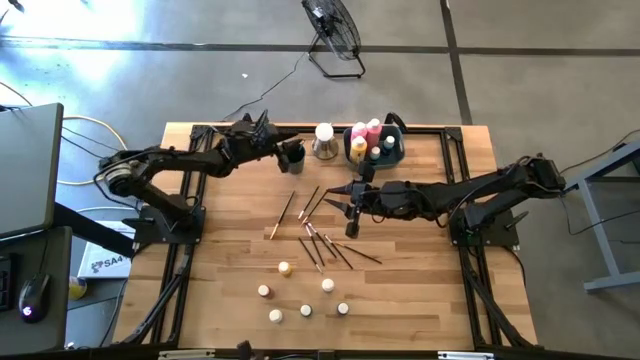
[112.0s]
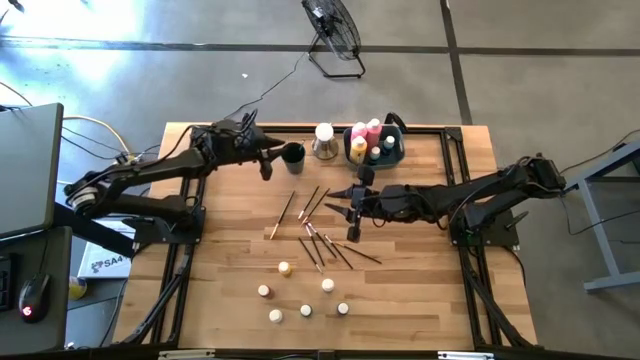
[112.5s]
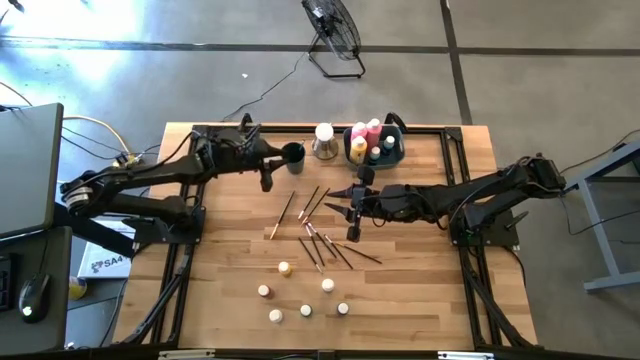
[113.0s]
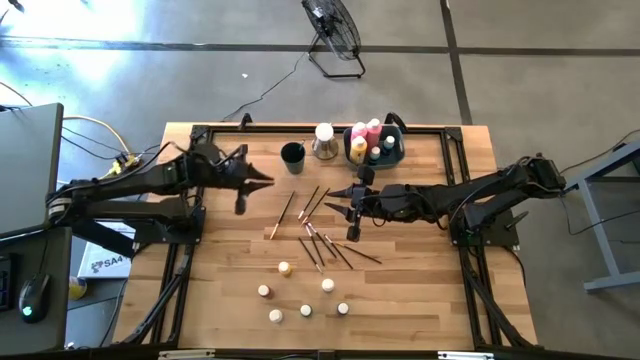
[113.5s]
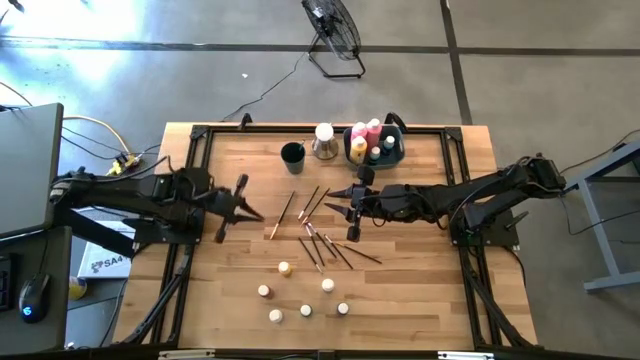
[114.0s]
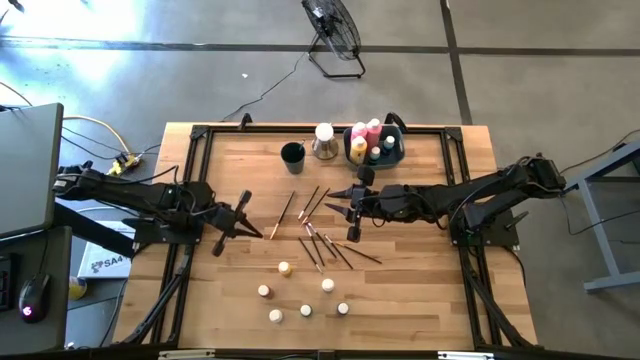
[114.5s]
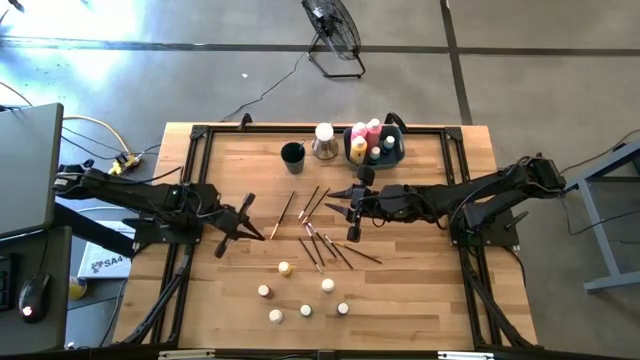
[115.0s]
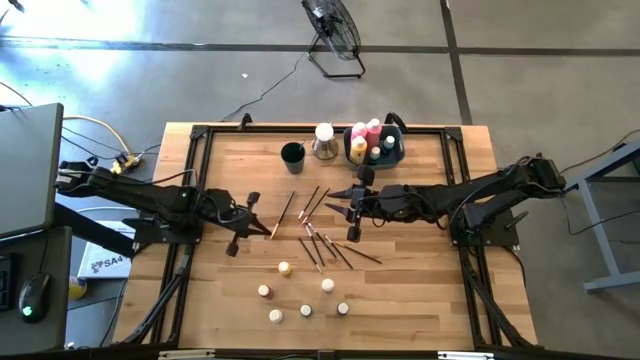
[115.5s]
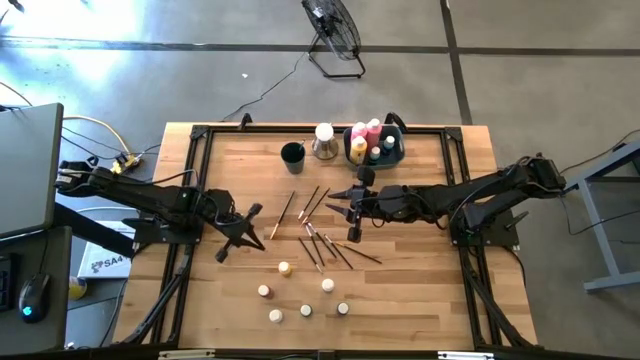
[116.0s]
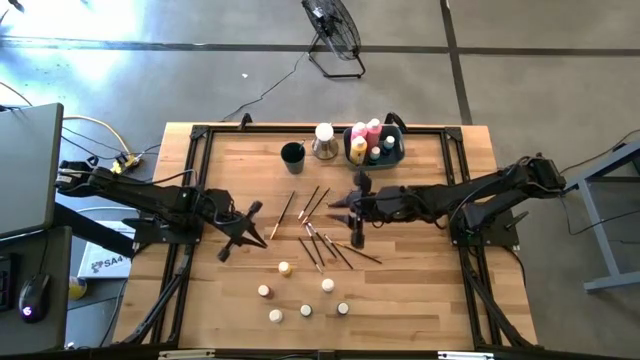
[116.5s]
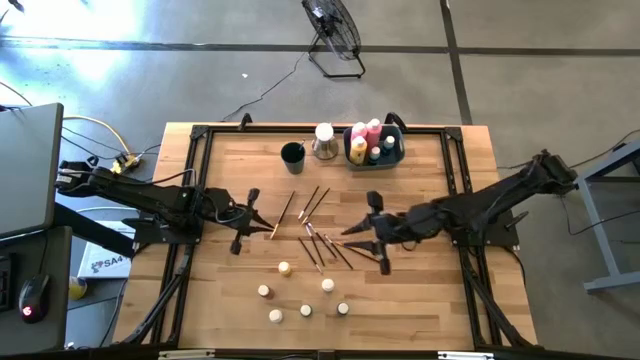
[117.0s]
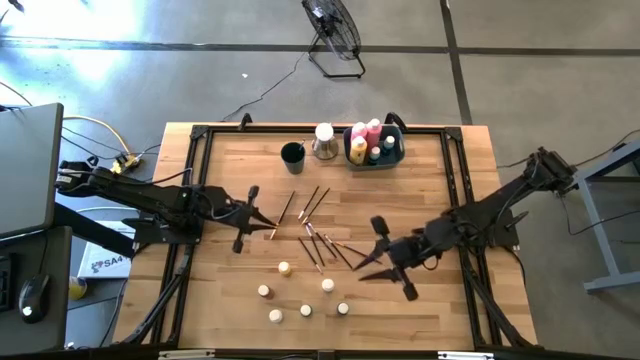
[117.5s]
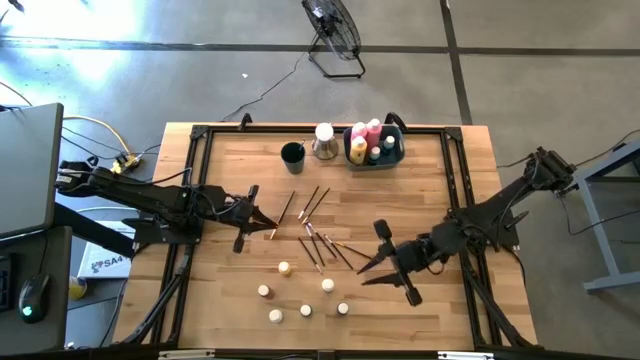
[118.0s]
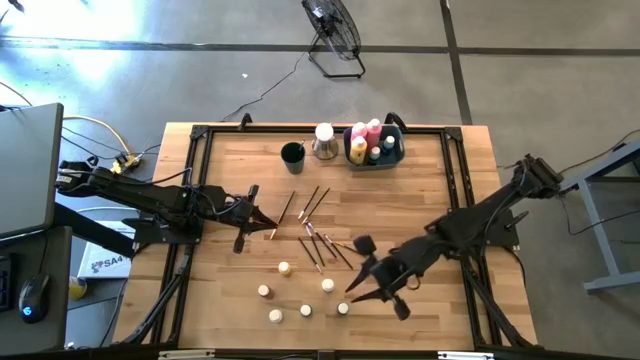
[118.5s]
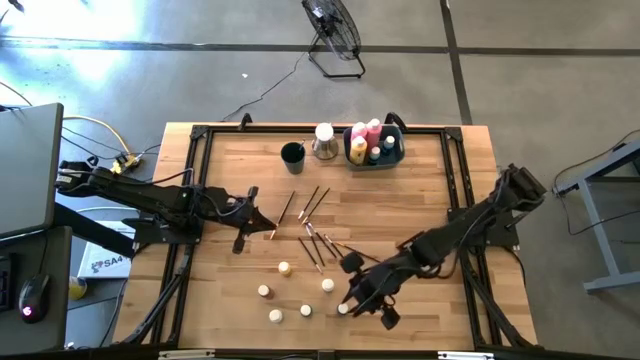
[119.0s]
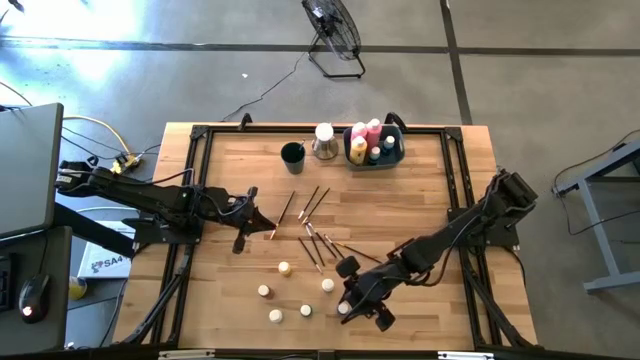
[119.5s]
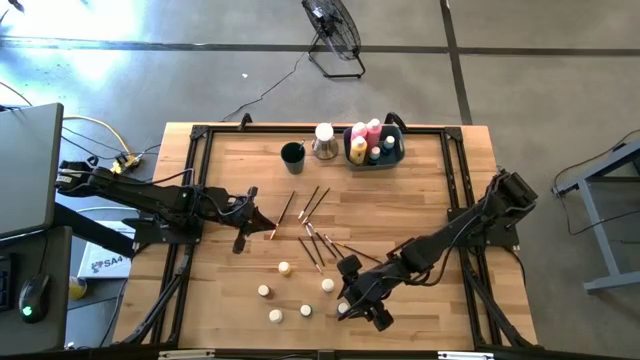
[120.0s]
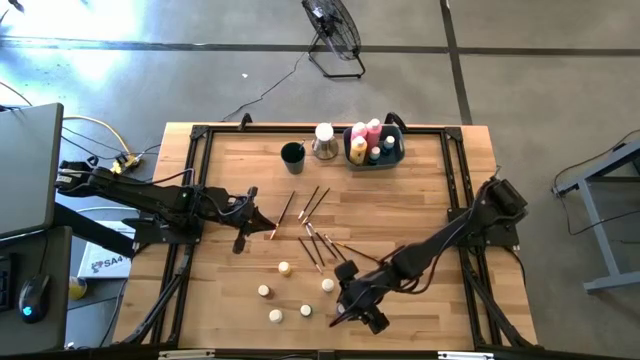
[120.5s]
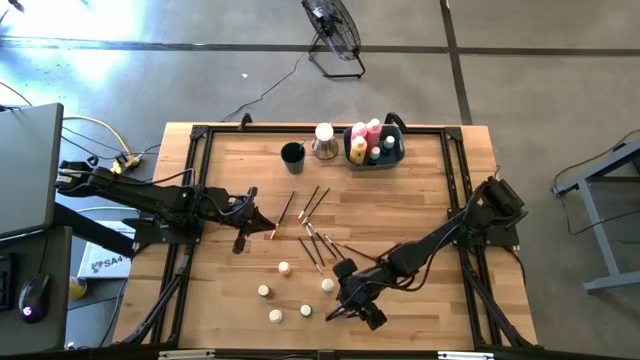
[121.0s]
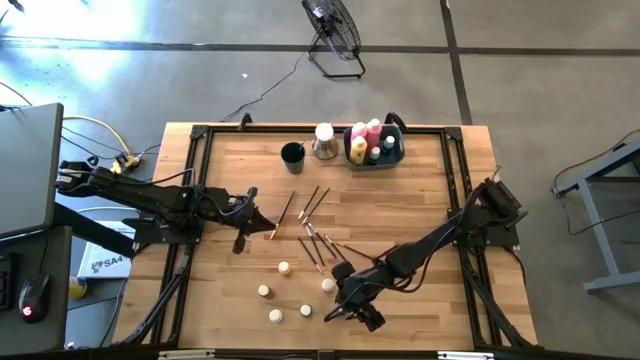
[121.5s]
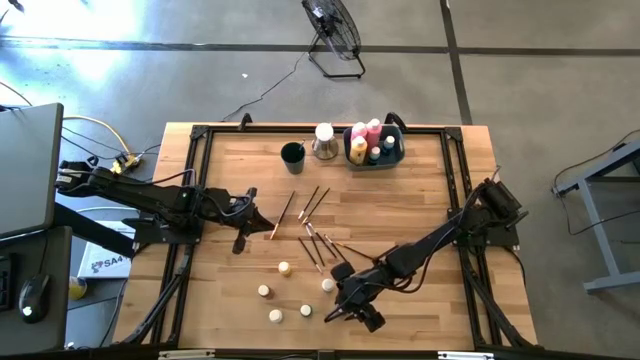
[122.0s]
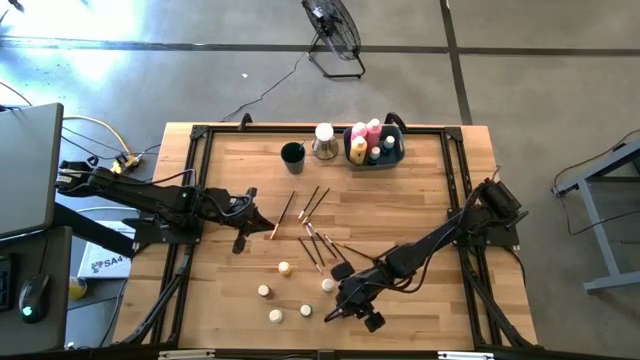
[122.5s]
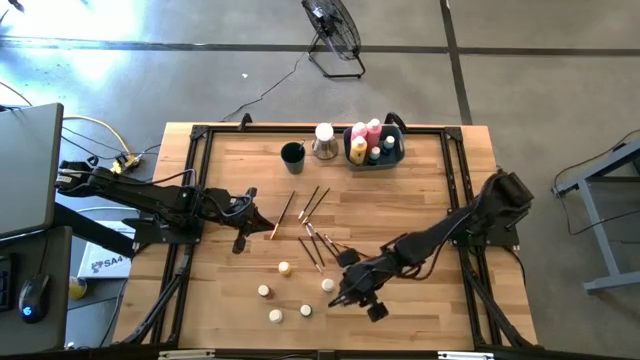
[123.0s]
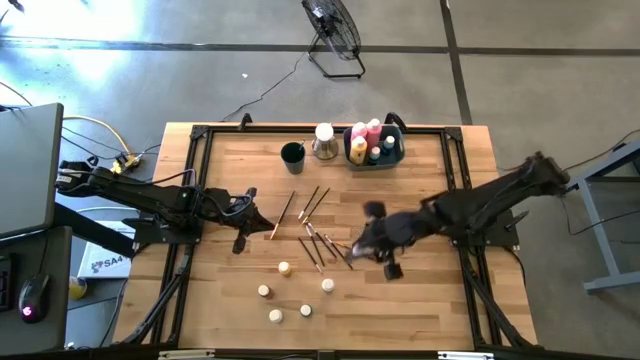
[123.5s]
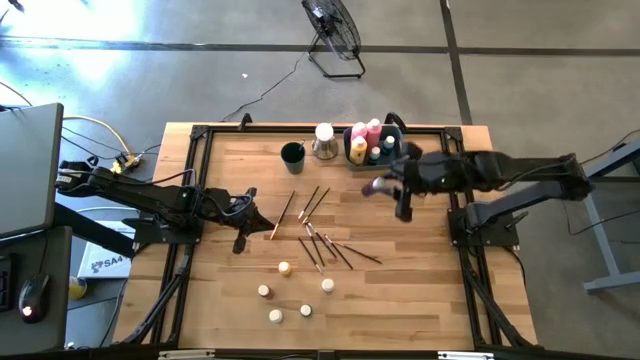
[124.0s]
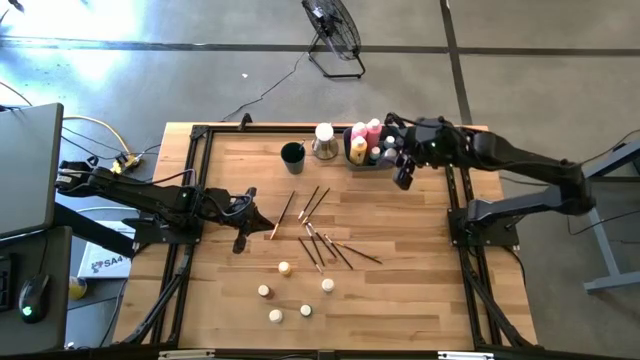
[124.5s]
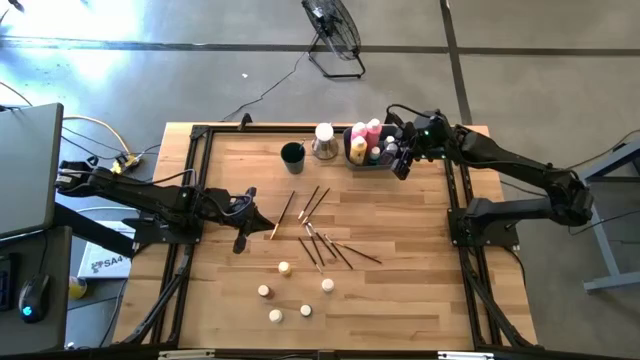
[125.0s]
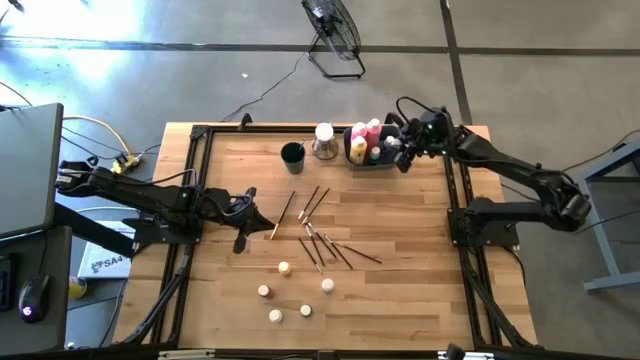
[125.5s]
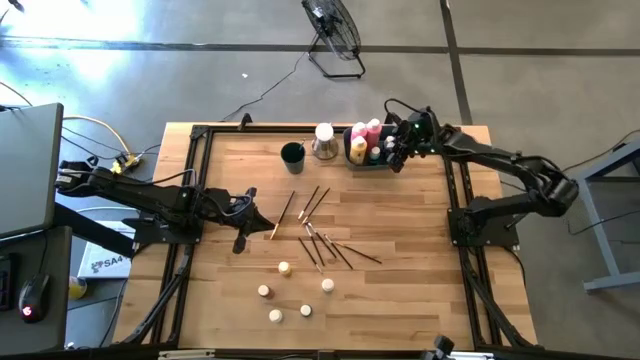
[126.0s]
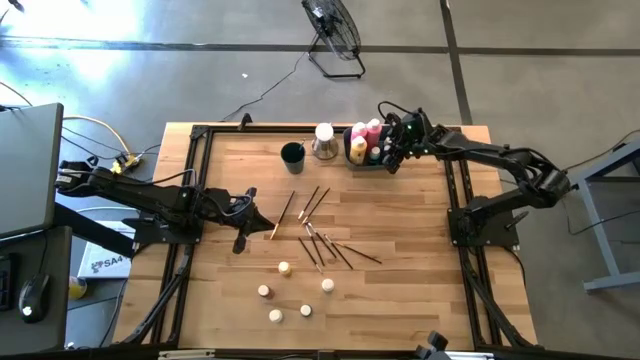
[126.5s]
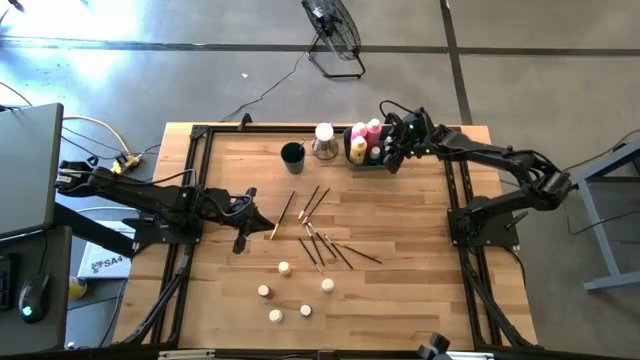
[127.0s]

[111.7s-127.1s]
Task: Pick & Place Paint Supplies
Put the small blue paint bottle into the blue bin
